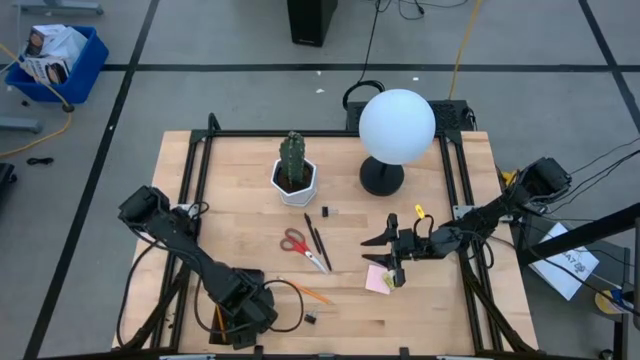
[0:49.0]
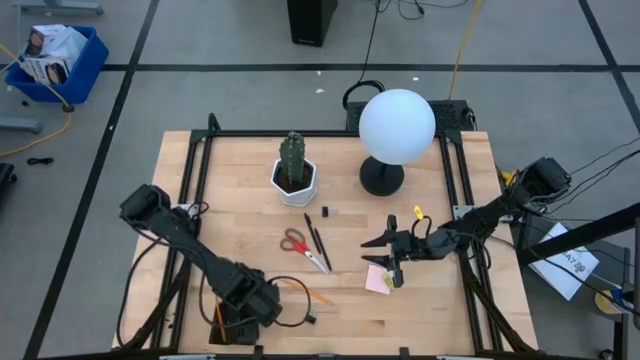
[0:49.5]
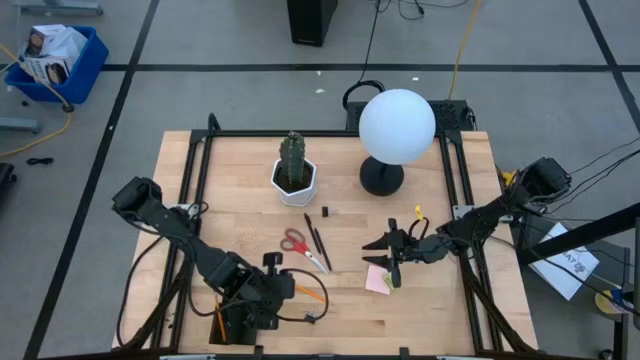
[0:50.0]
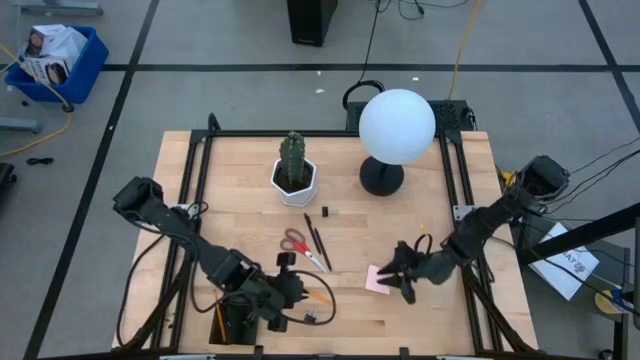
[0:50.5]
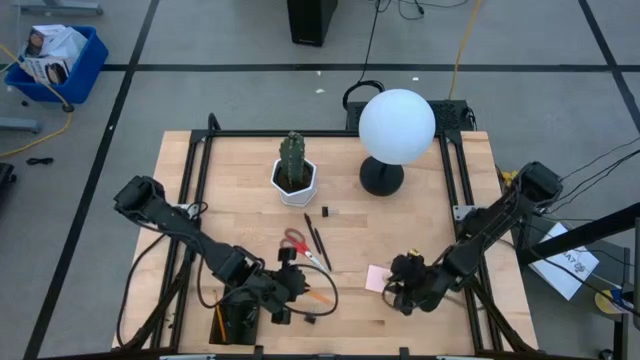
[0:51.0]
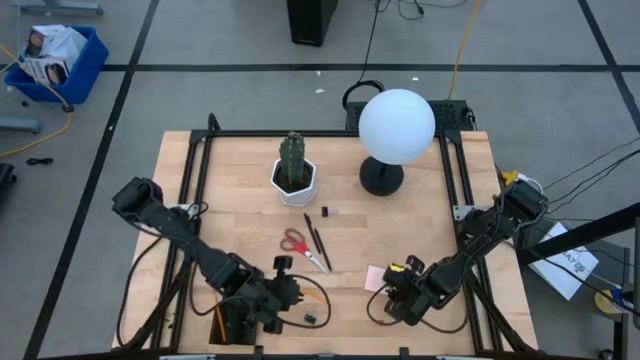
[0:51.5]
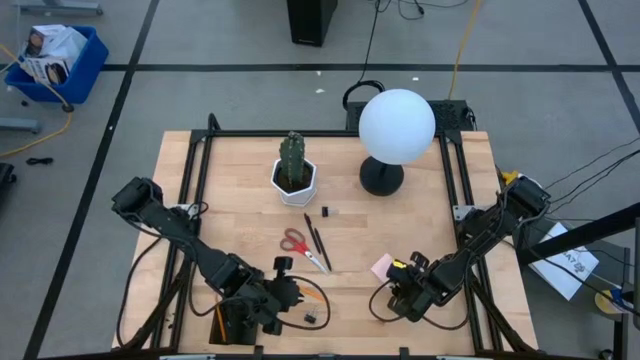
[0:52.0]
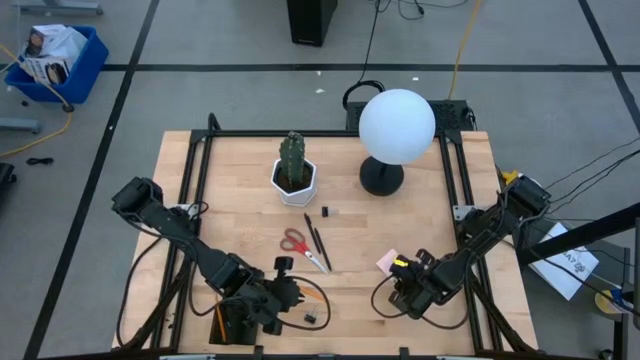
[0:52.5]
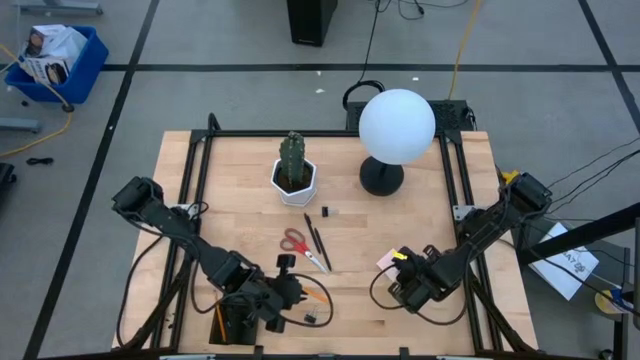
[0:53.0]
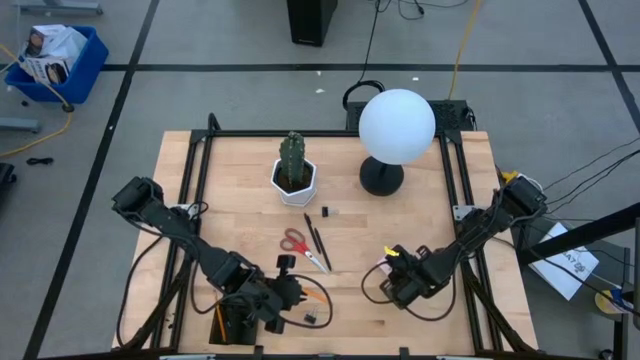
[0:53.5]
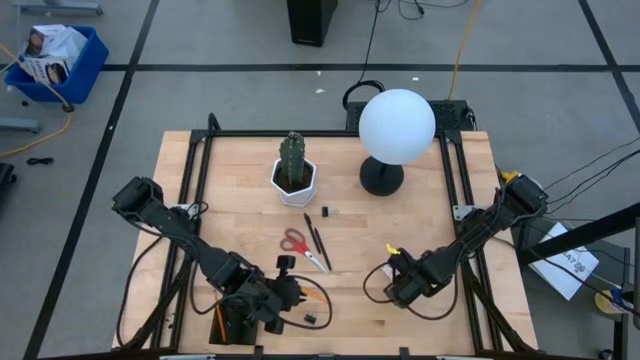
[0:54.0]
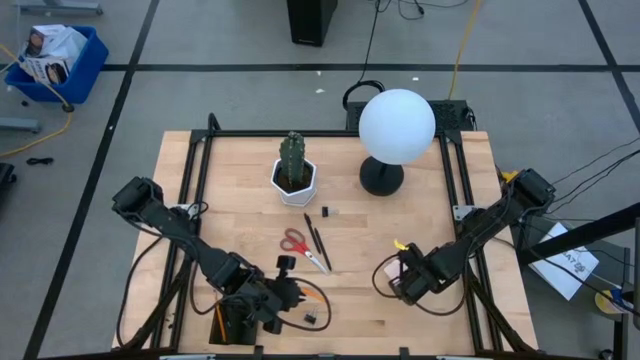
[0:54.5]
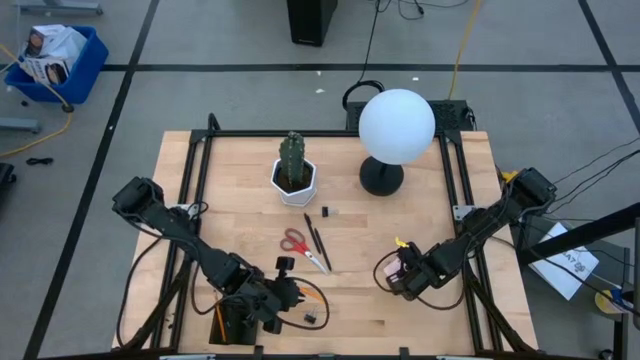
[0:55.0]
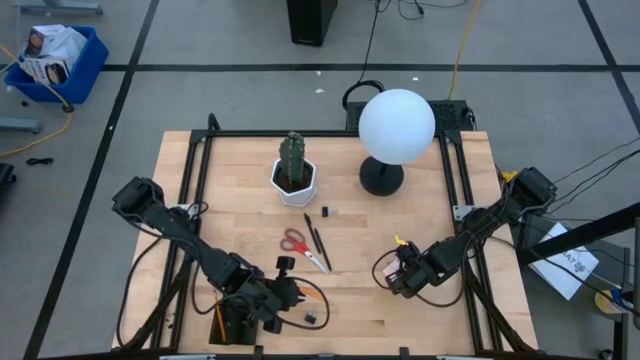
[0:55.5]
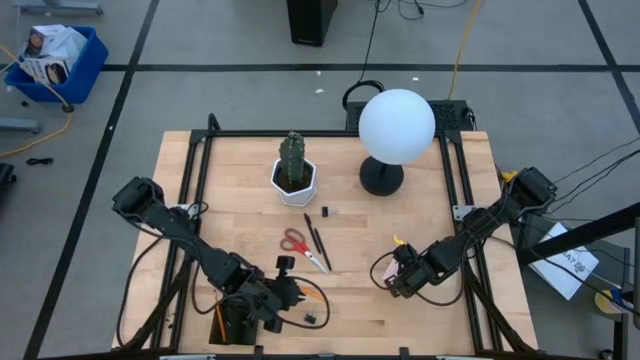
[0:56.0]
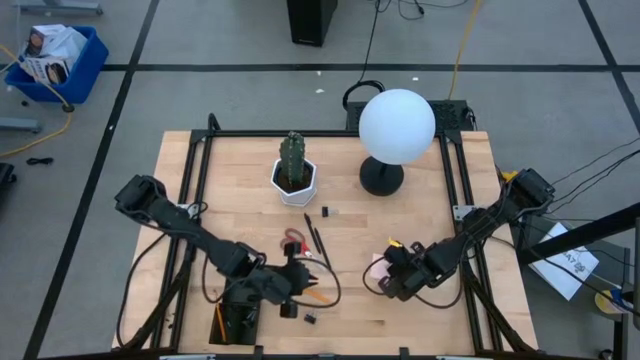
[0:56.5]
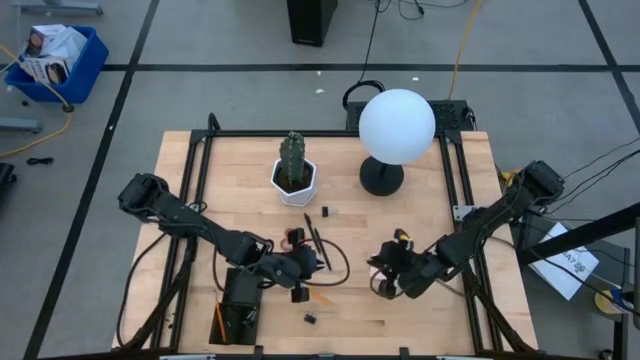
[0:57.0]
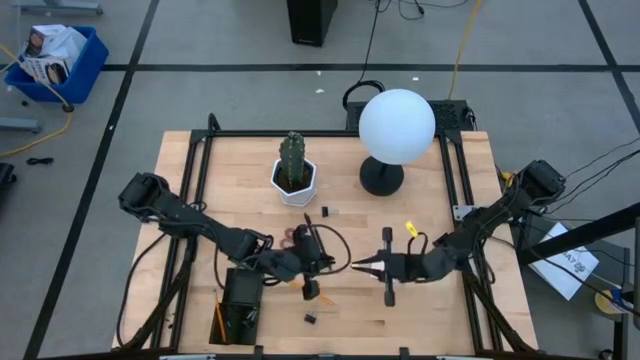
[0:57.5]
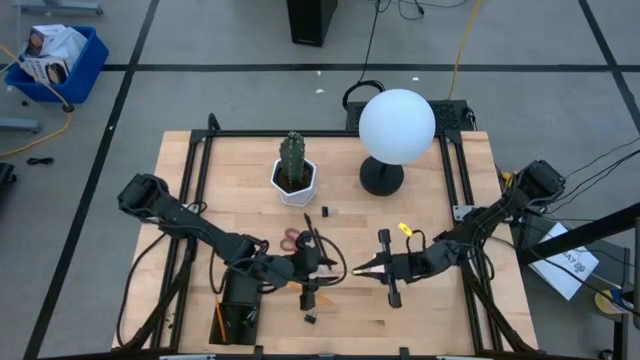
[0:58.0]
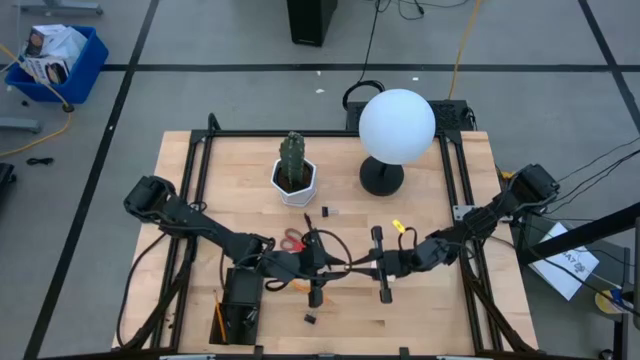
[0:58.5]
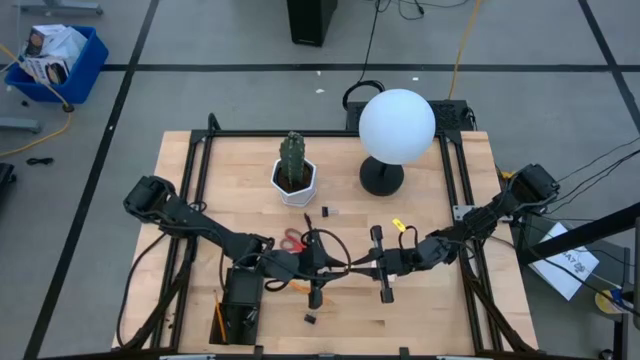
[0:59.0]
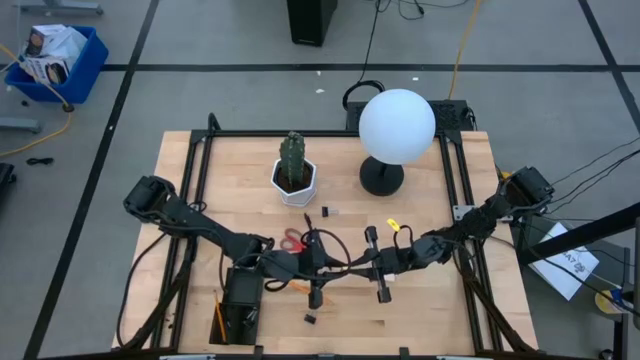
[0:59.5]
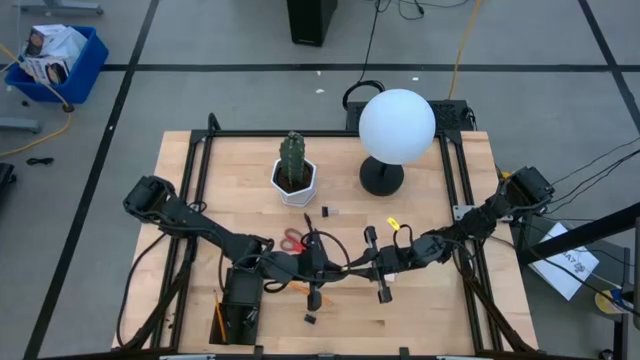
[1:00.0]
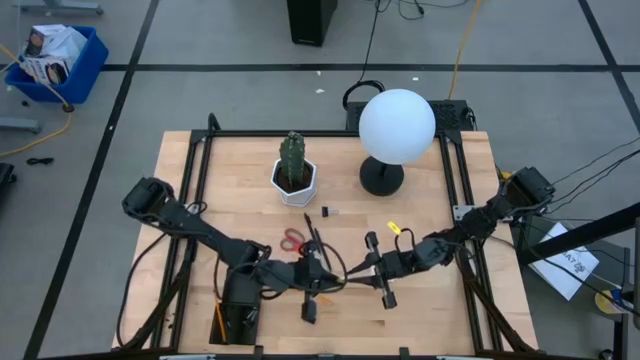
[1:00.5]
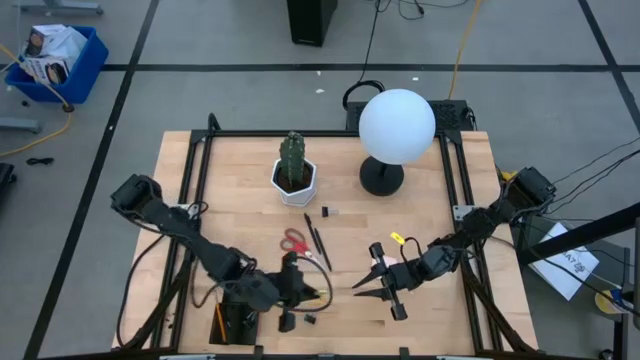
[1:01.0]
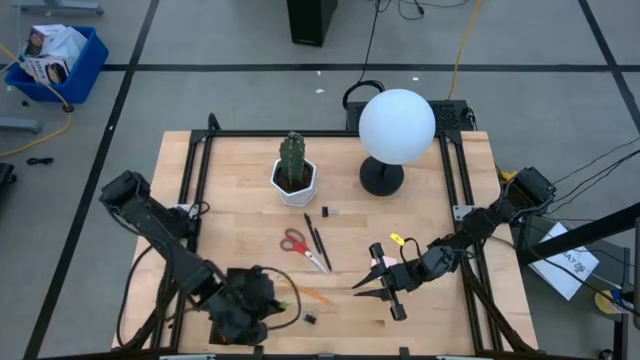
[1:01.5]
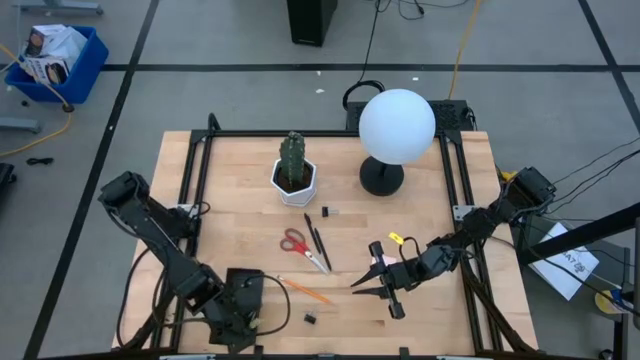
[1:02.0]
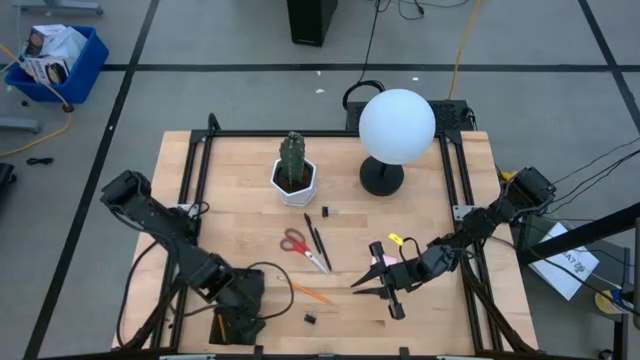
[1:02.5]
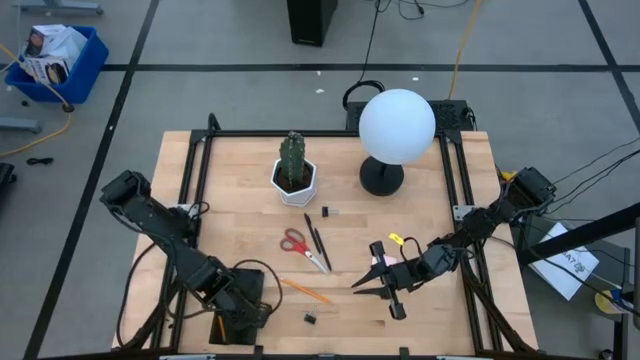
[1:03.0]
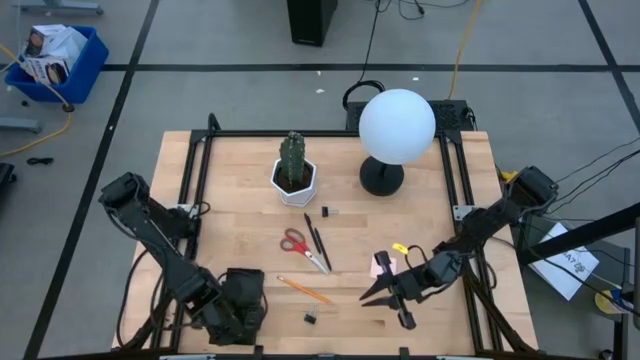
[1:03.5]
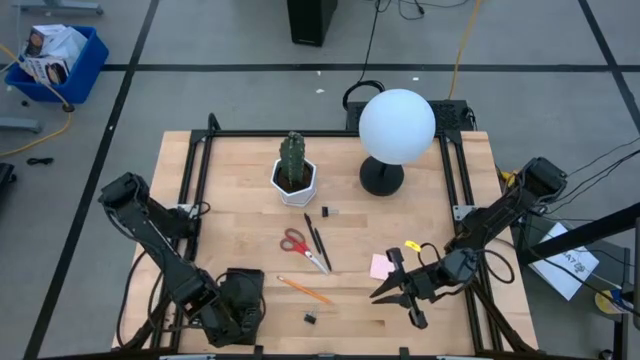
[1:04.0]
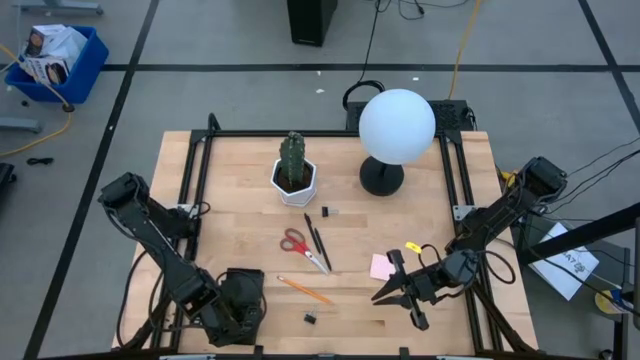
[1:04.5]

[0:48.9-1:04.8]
Task: Pick and place office supplies into organizer
Put the eraser in the desk organizer

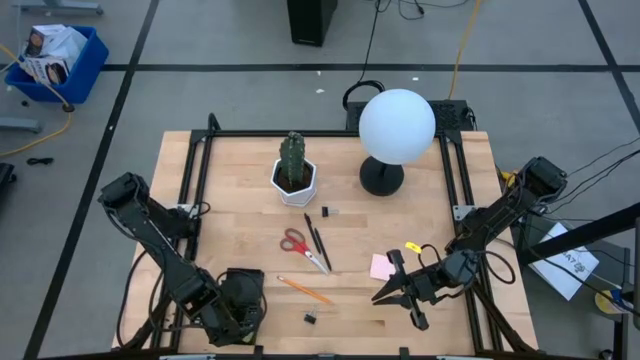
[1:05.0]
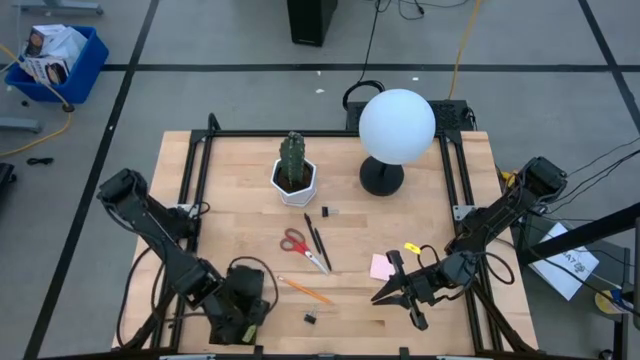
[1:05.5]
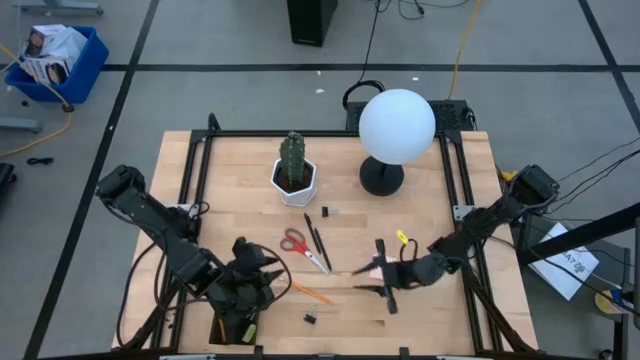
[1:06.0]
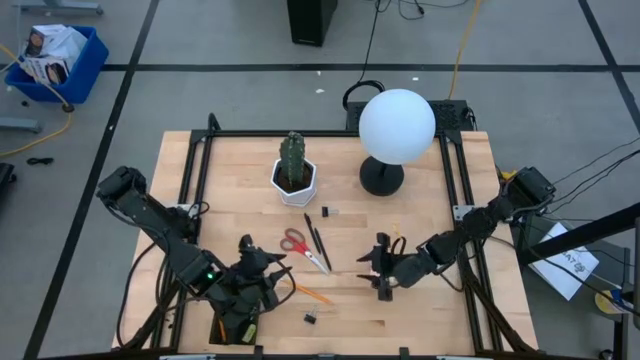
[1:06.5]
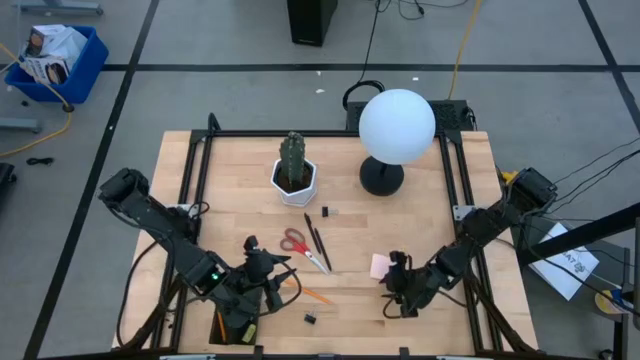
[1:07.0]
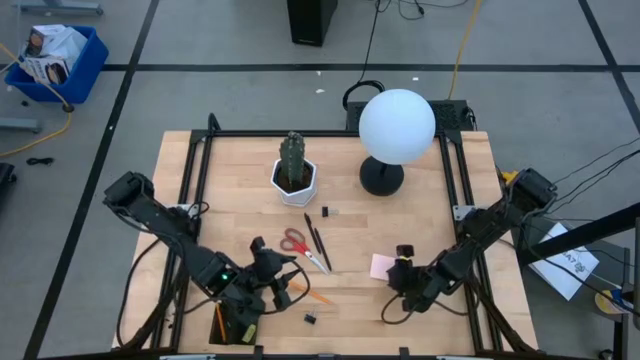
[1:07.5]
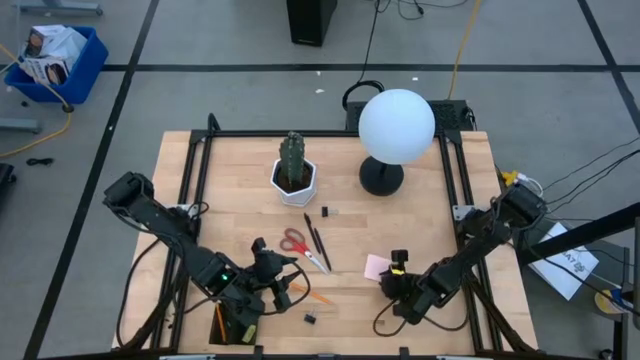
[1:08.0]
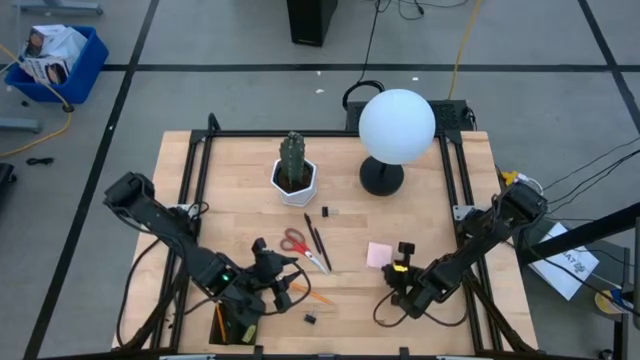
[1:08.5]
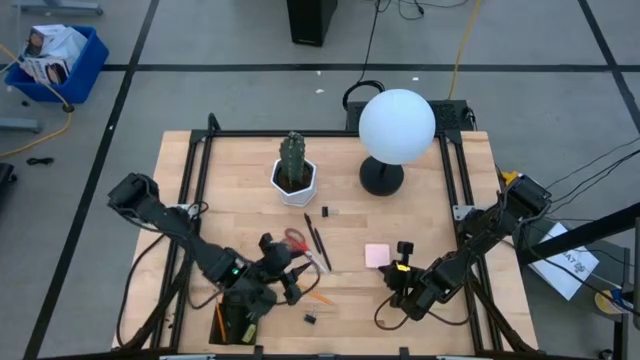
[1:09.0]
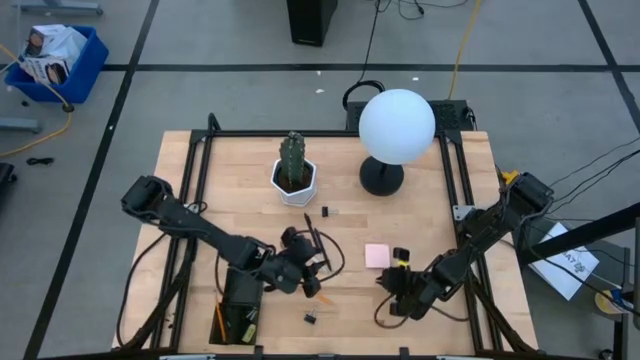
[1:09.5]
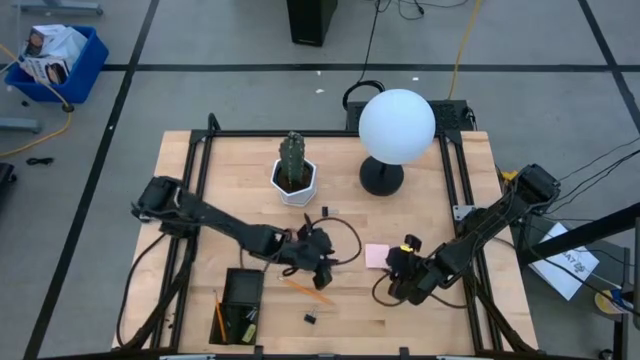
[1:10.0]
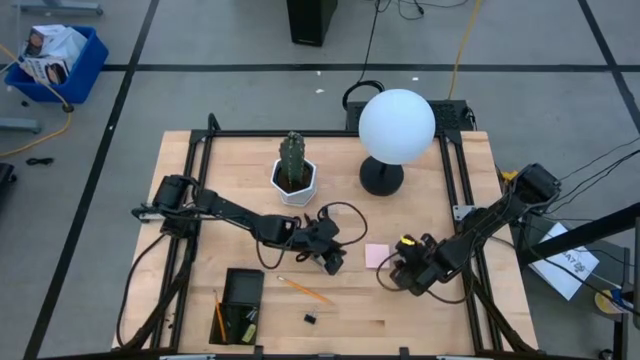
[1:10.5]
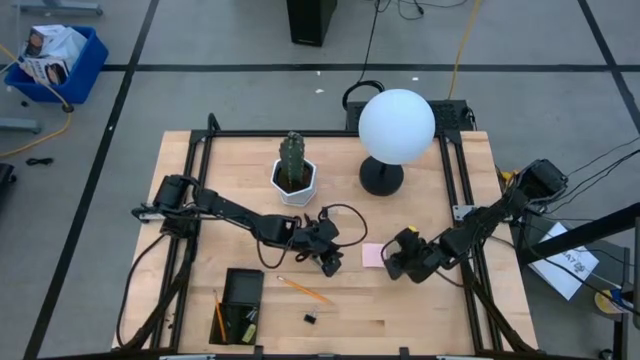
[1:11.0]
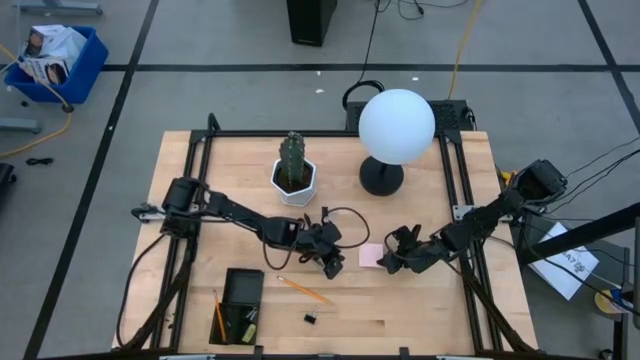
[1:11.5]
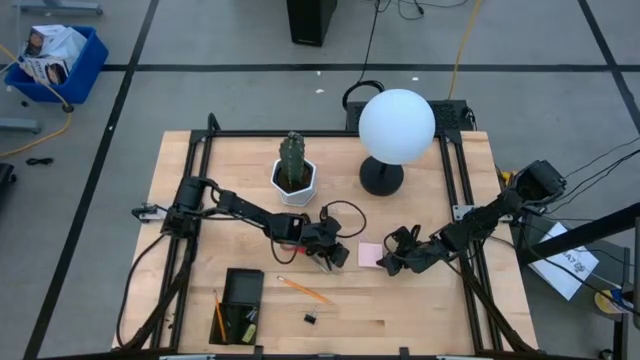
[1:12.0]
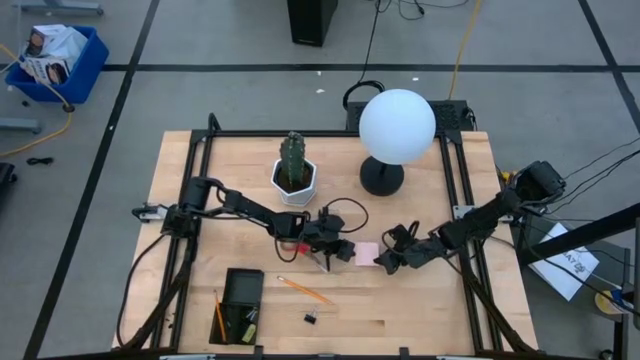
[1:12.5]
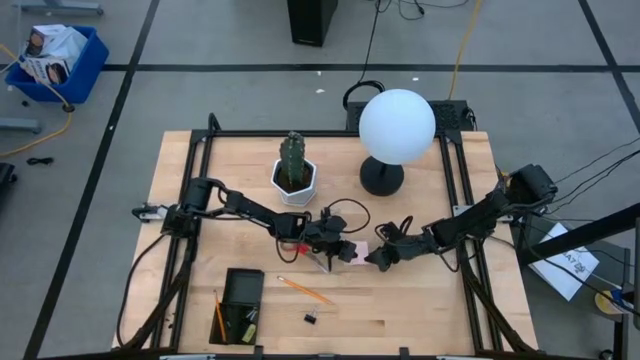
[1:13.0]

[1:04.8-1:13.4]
Put the sticky notes in the desk organizer
